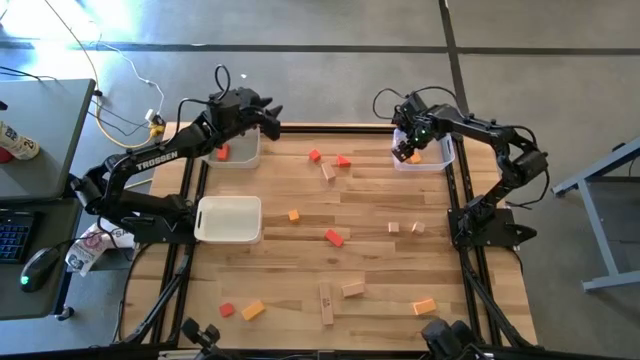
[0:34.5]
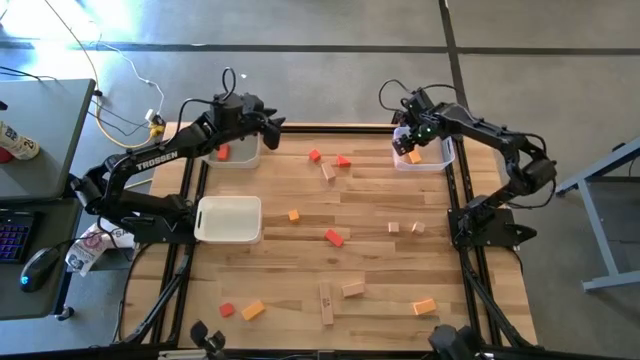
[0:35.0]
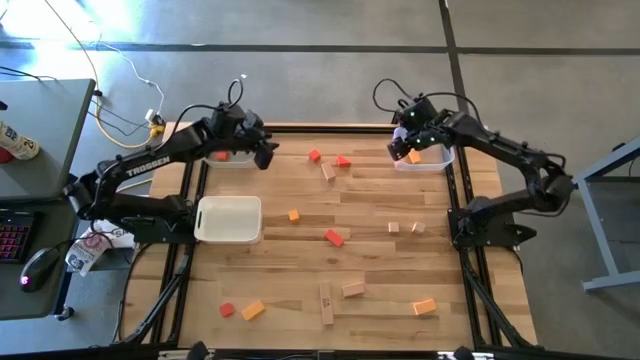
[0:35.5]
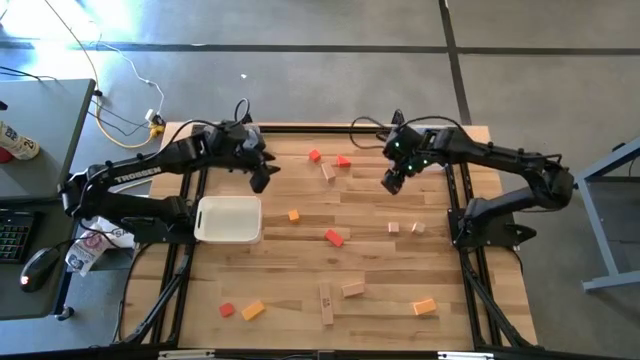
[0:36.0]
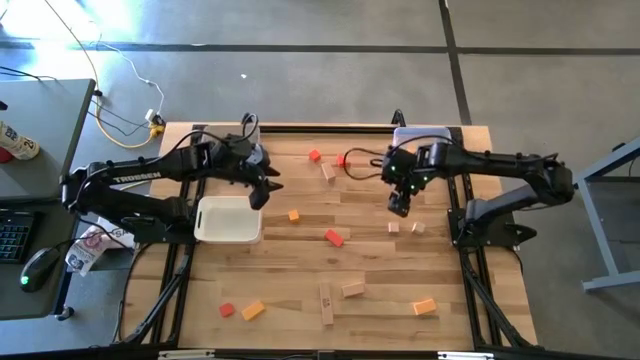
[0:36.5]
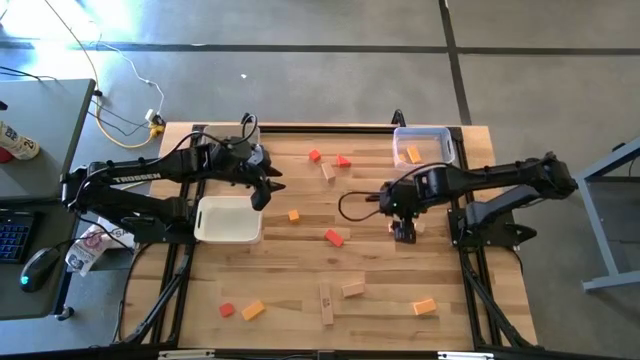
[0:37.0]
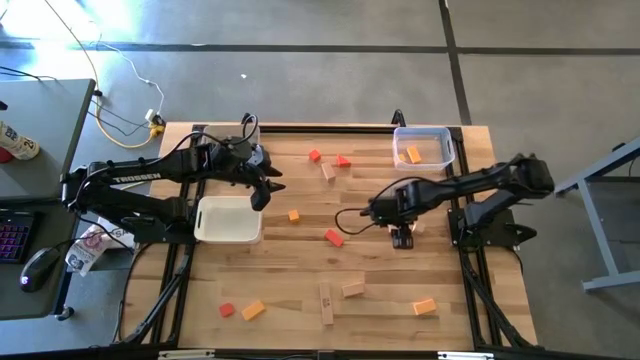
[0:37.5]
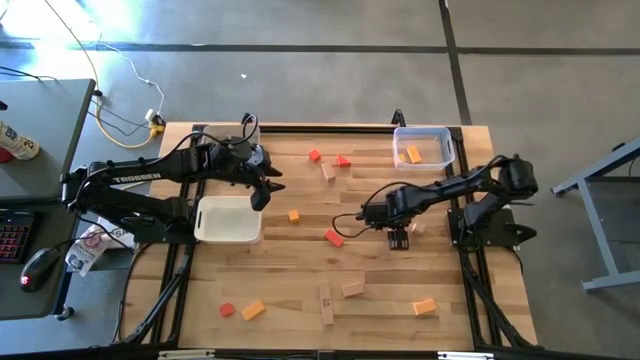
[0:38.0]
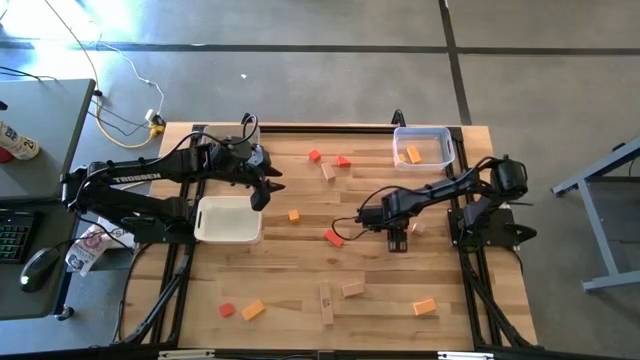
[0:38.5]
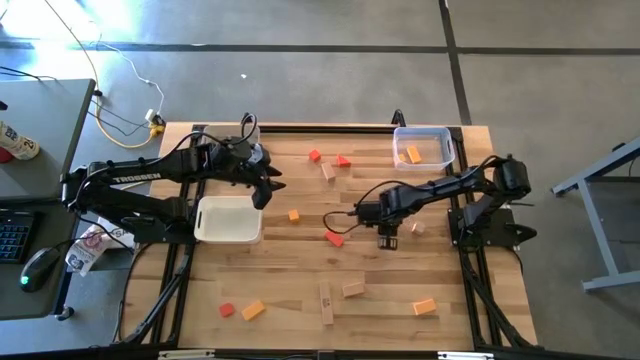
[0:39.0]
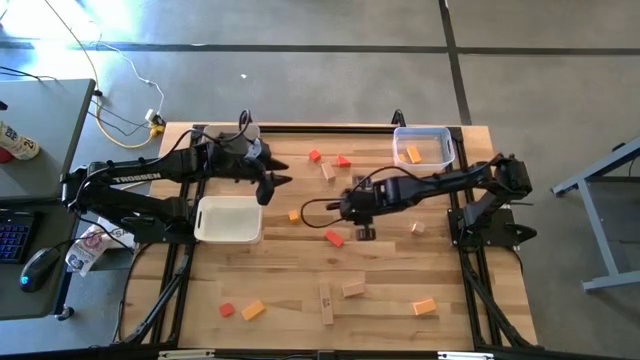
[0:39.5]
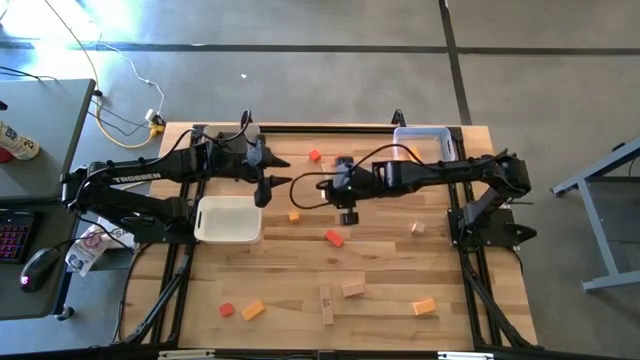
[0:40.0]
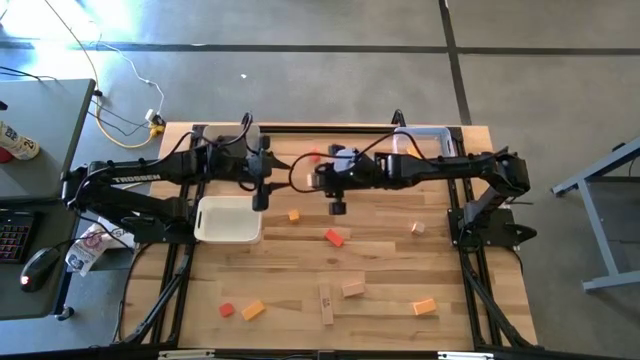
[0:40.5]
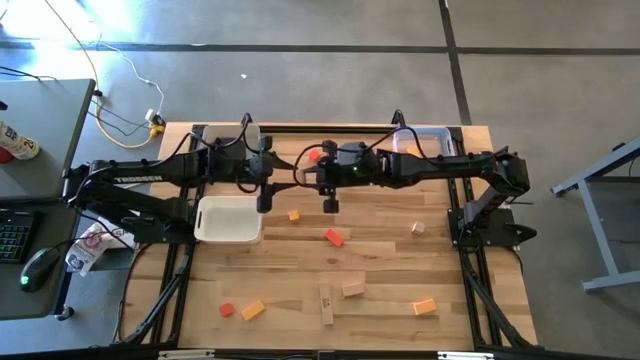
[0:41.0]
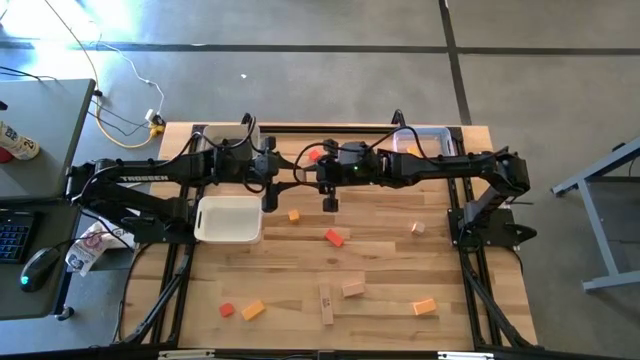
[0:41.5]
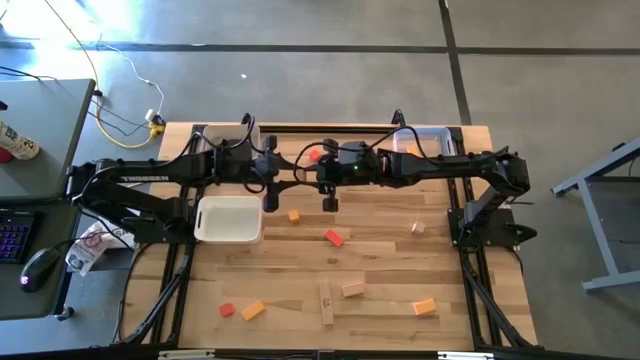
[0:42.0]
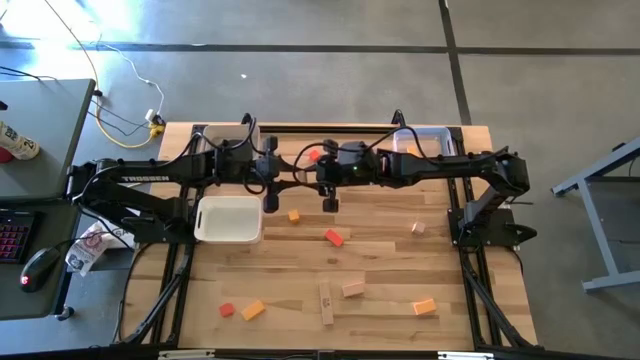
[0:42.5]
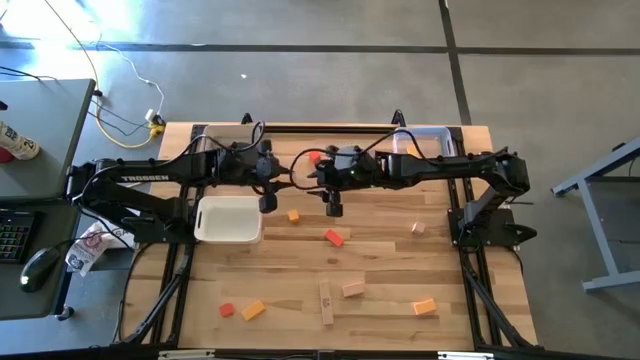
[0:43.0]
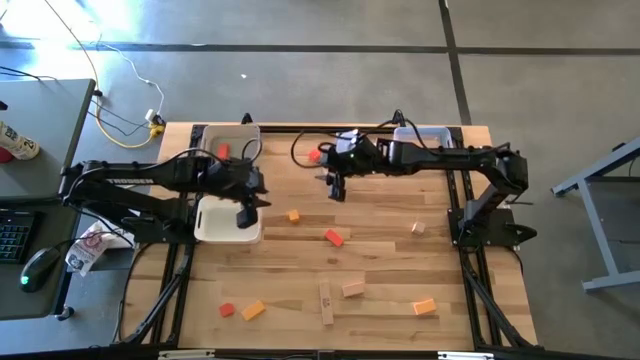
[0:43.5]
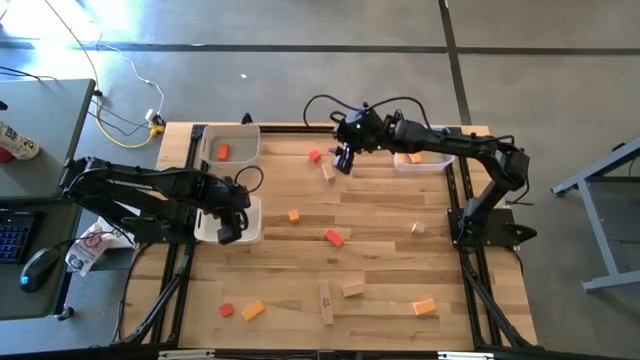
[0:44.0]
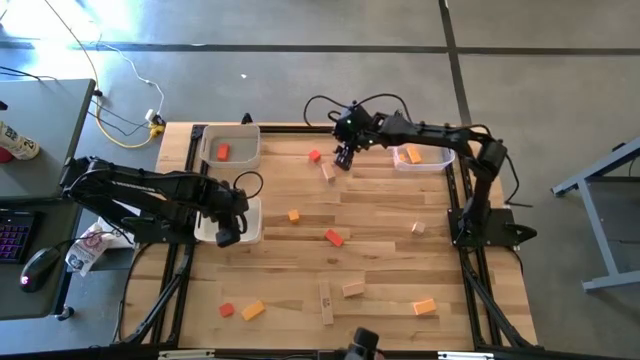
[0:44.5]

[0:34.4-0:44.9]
Task: Sort & place blocks by color
Put the brown block into the white bin

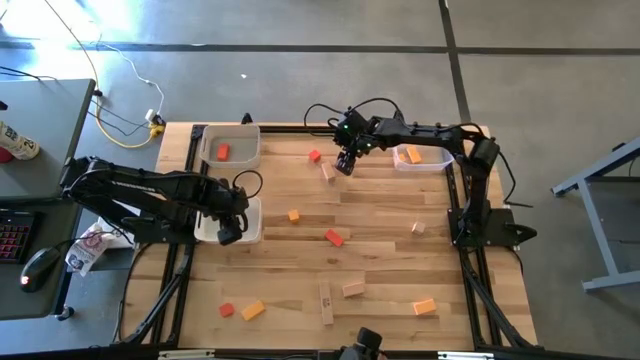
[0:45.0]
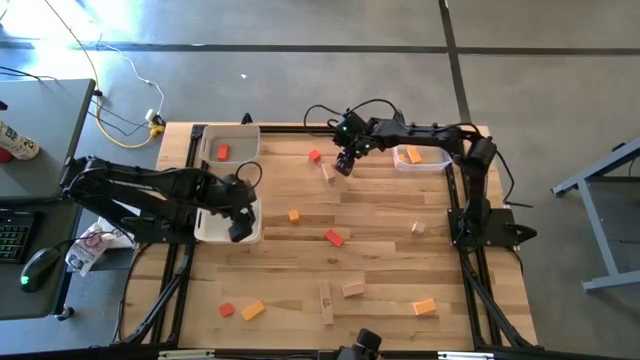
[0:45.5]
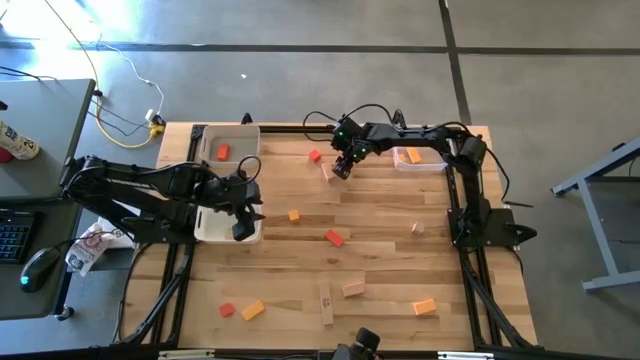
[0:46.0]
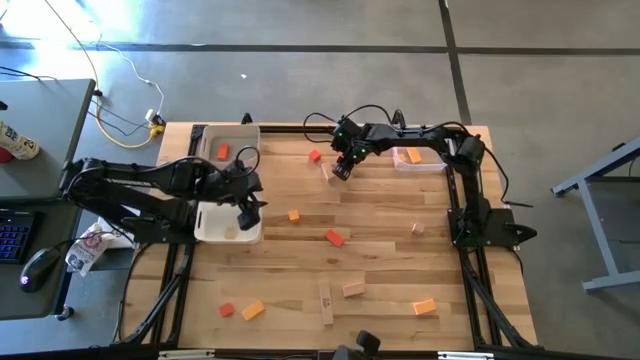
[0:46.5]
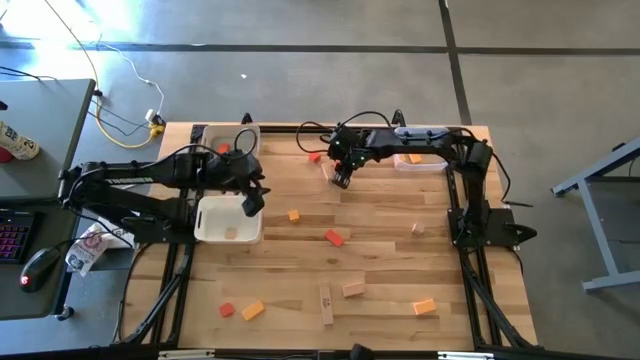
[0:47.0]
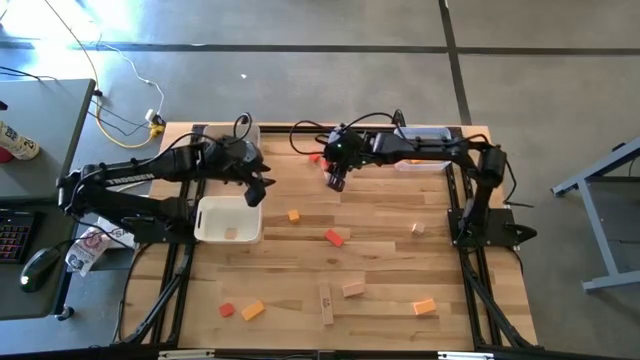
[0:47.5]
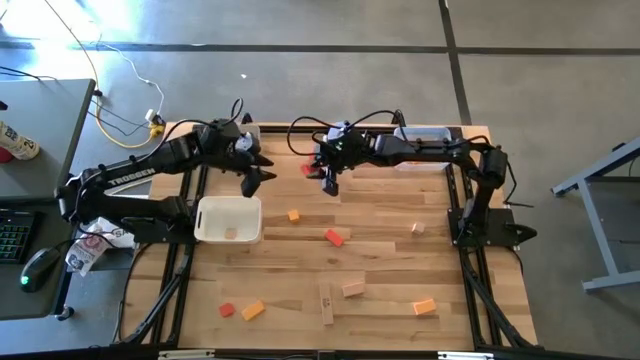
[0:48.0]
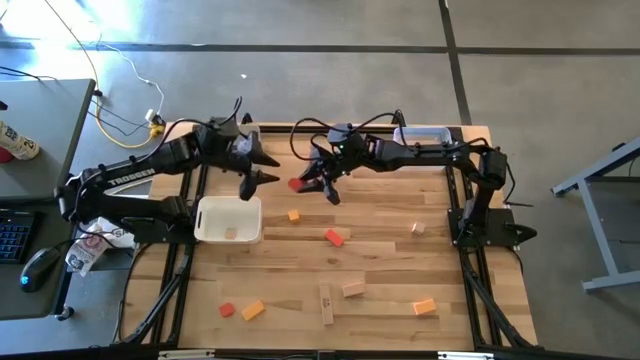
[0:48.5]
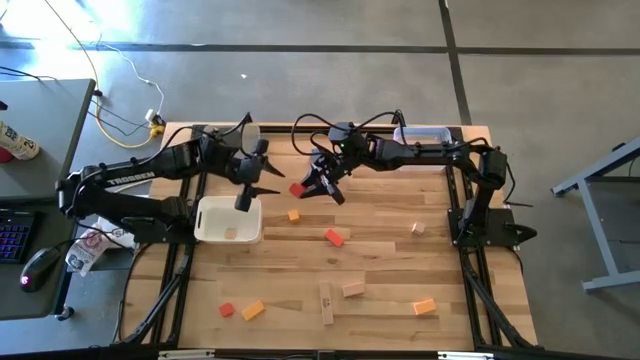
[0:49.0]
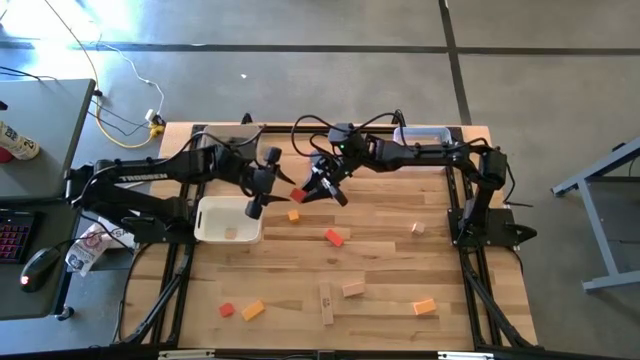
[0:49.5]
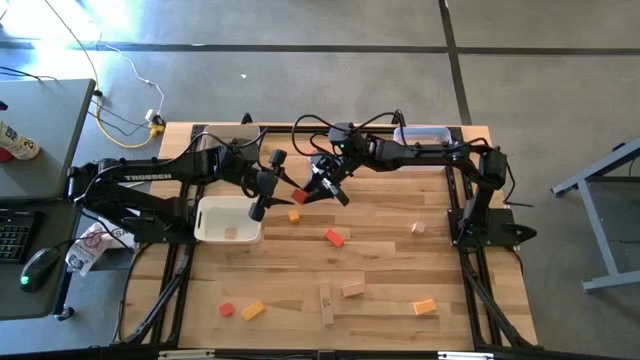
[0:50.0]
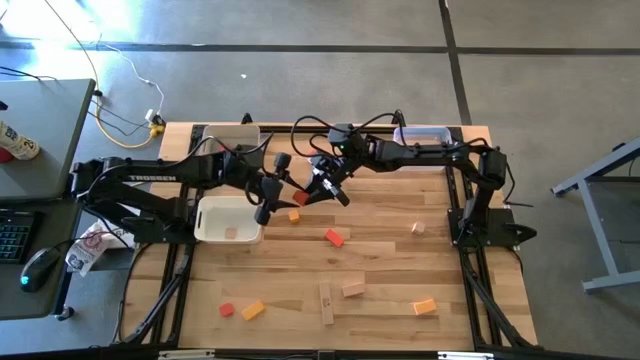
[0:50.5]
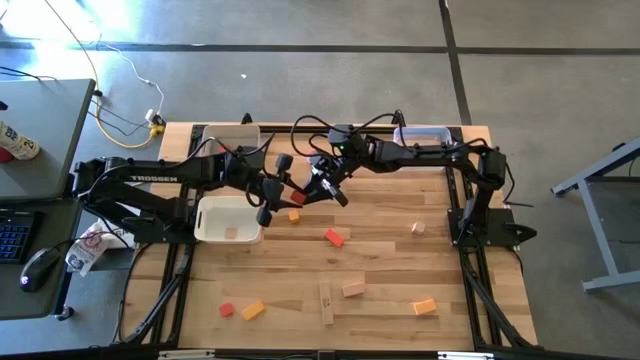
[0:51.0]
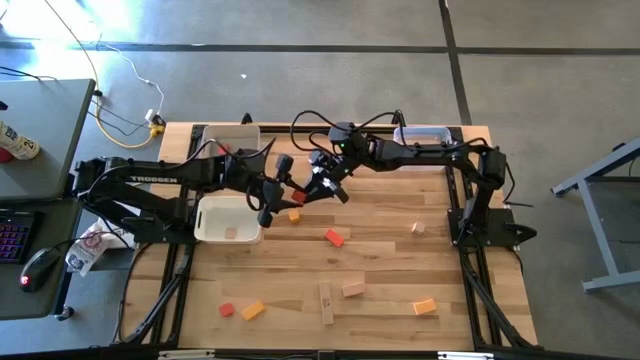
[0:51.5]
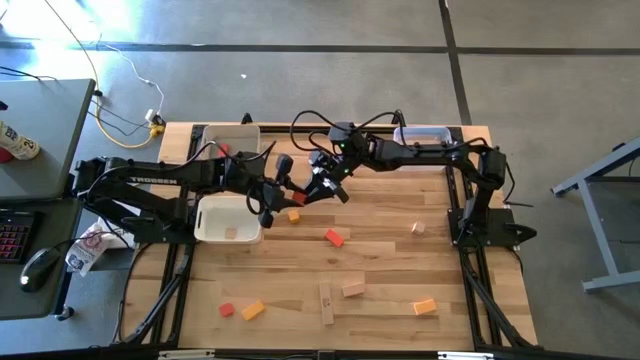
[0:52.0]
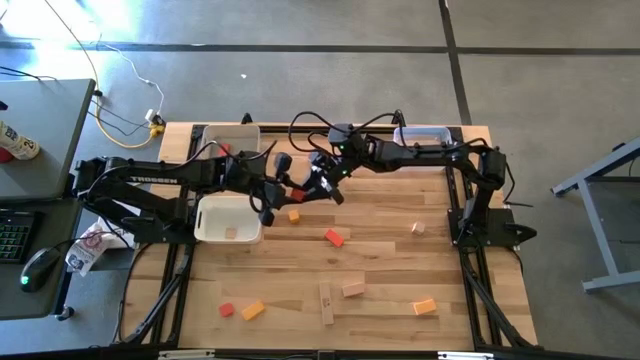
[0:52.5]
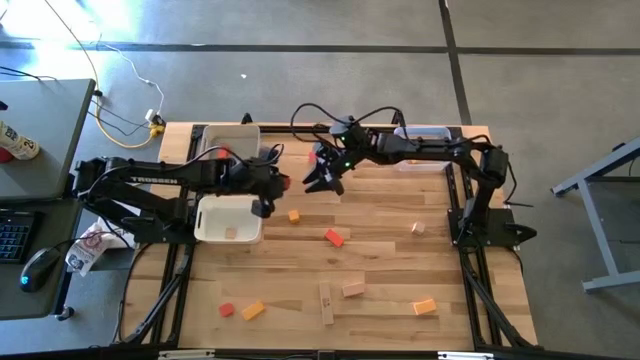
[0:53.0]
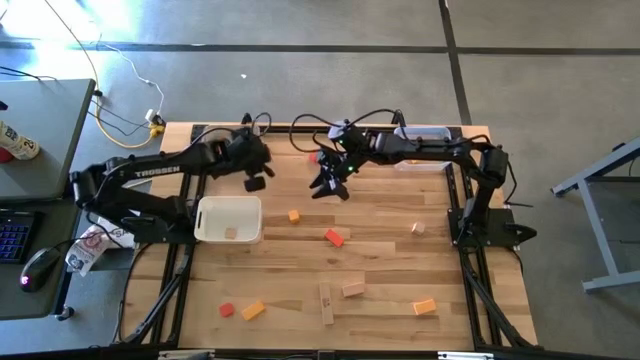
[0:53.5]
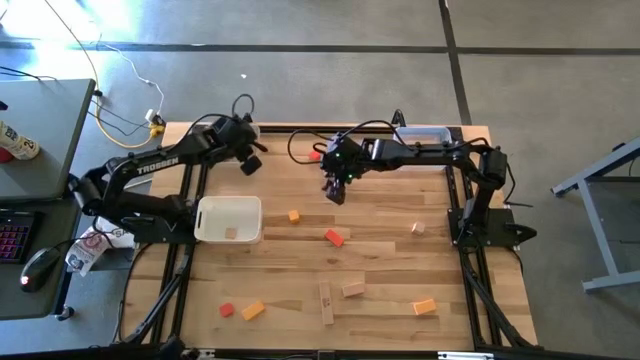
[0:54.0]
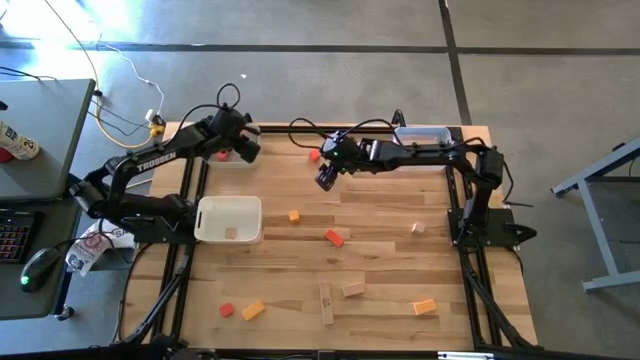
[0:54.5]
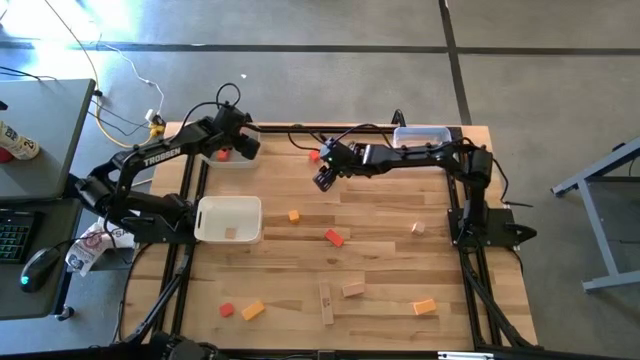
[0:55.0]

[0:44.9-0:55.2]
Put the orange block into the gray bin
